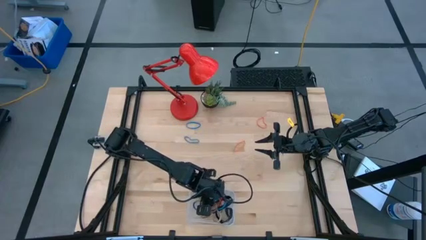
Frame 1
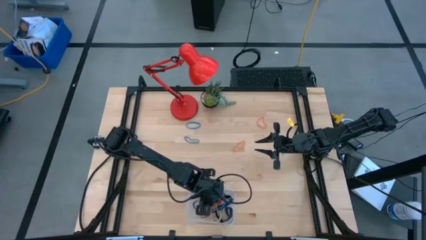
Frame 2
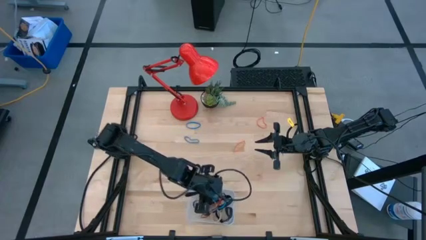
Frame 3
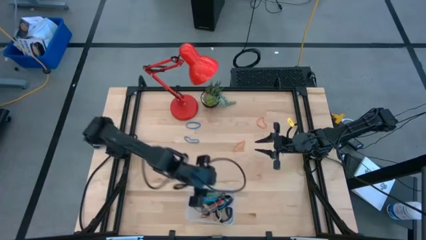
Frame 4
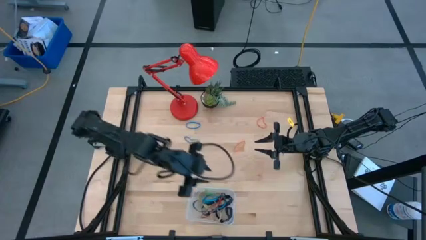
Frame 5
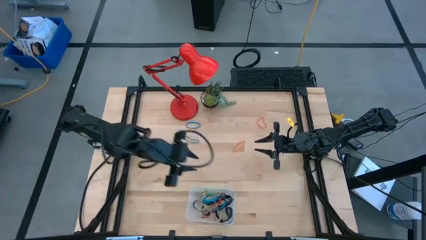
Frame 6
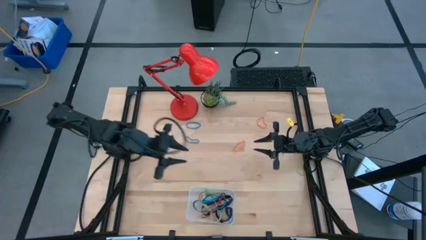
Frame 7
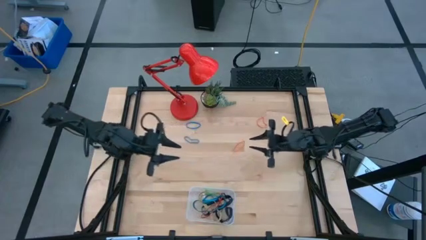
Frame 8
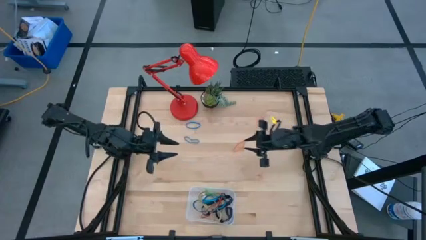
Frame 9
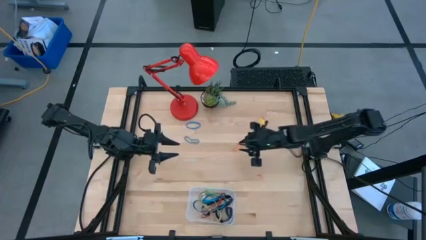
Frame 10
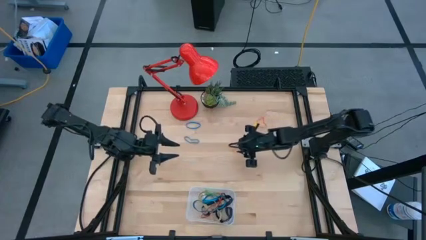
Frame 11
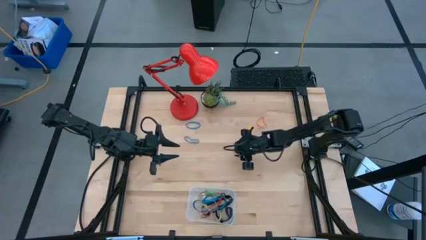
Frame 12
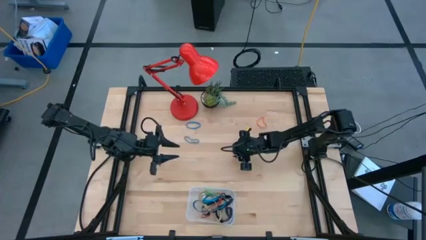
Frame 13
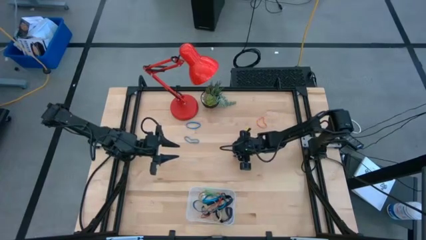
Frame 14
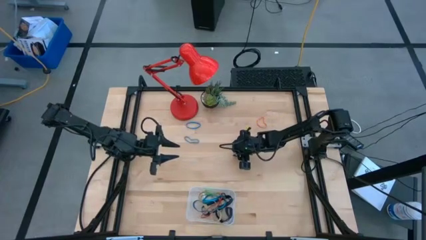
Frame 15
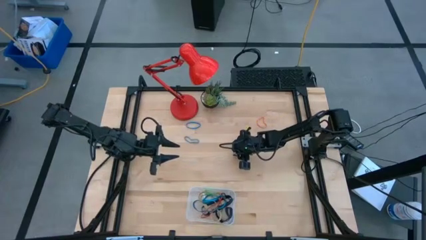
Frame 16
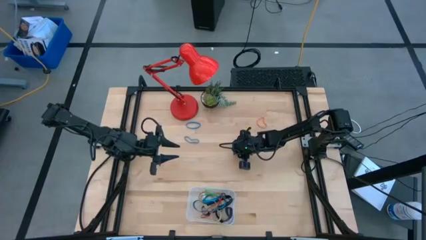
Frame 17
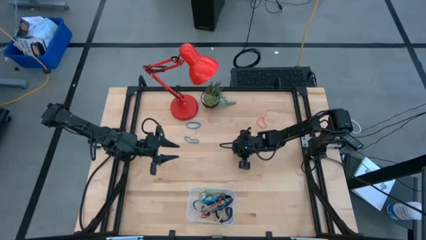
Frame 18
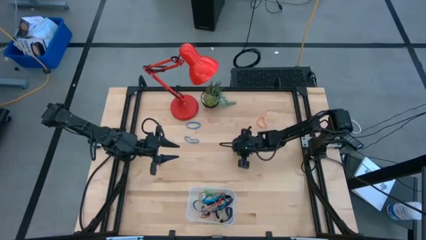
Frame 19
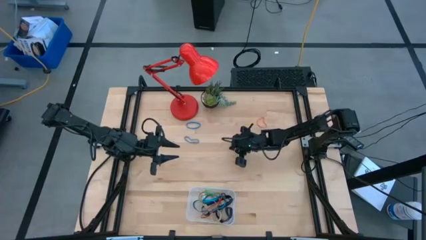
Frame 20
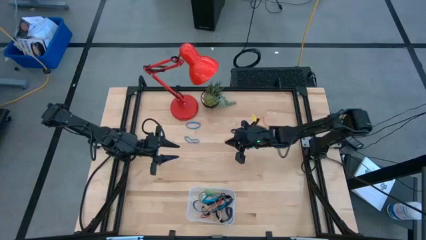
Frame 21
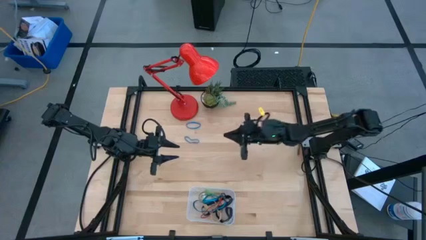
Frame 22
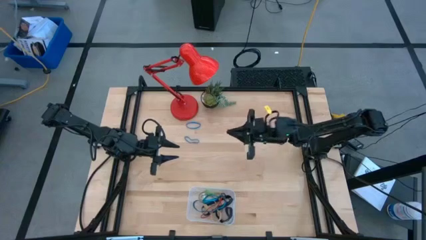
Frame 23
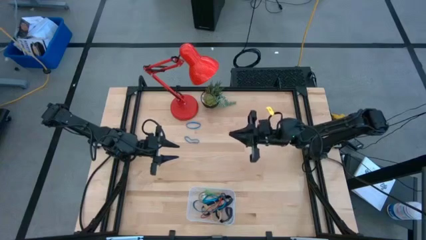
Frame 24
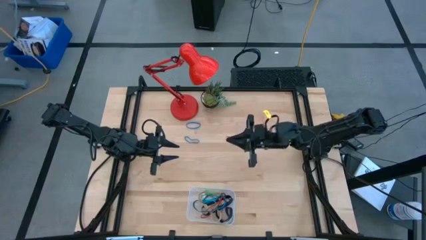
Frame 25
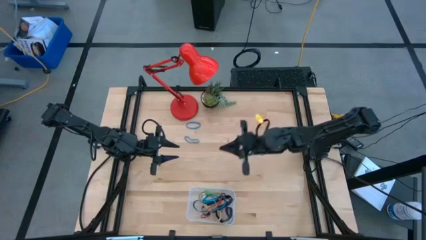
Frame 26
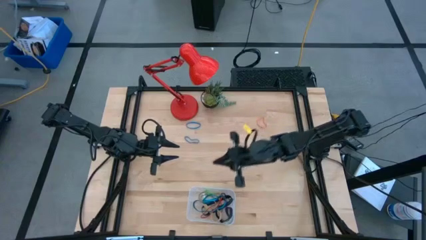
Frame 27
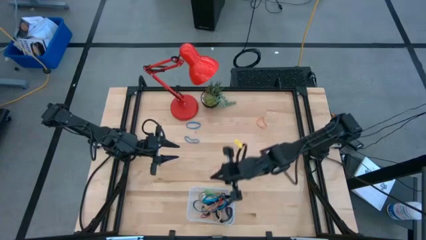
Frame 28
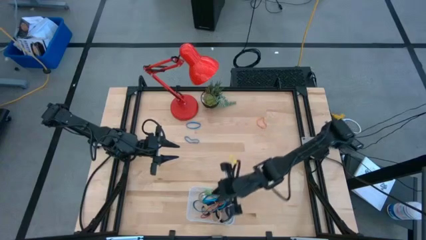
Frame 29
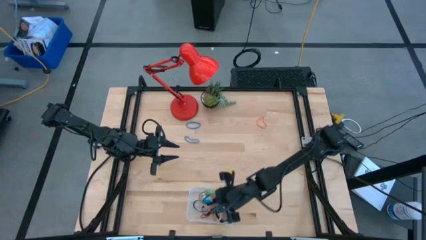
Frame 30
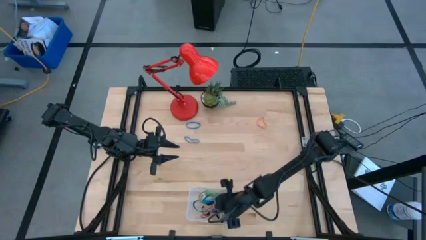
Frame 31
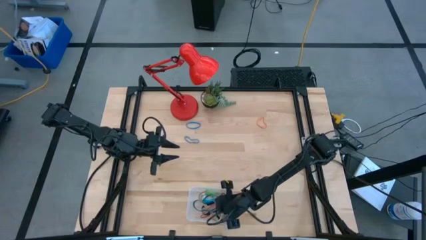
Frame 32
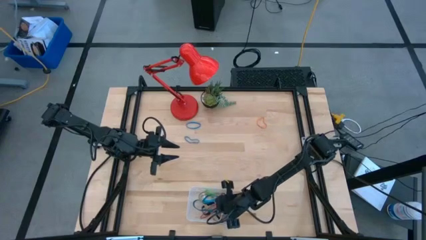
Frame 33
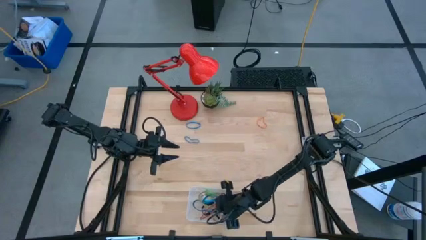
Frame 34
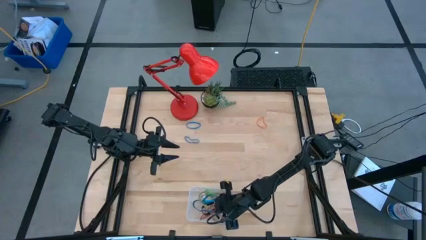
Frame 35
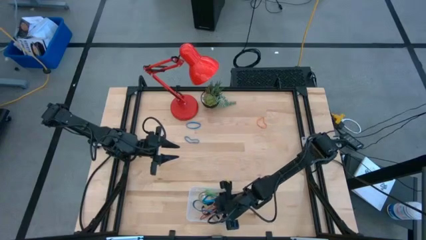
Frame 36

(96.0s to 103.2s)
Task: Pick and place rubber bands into bin
Put the orange rubber band into the transparent bin

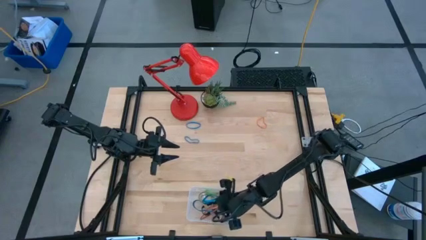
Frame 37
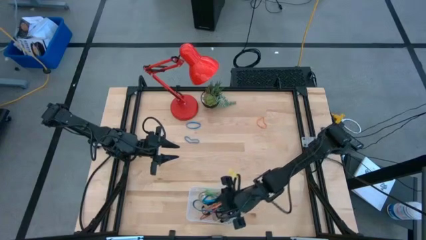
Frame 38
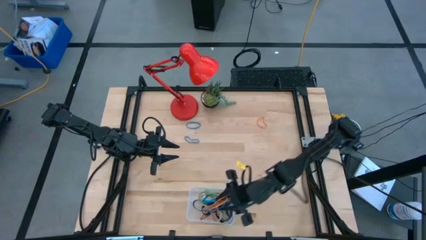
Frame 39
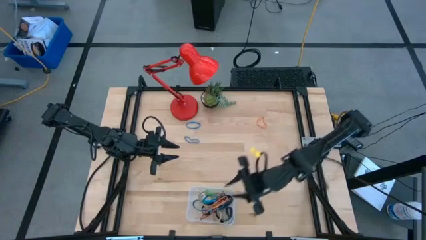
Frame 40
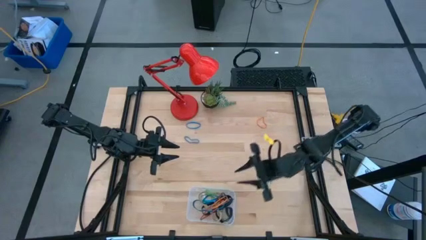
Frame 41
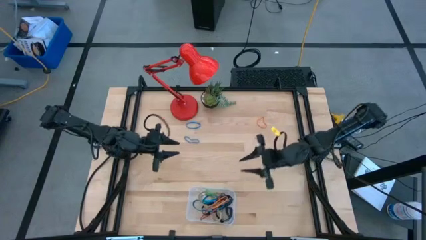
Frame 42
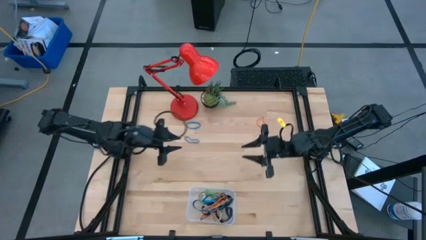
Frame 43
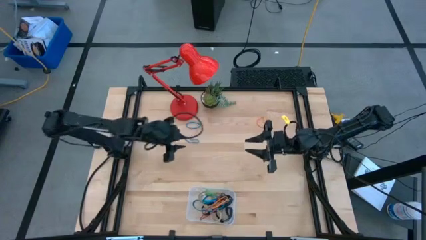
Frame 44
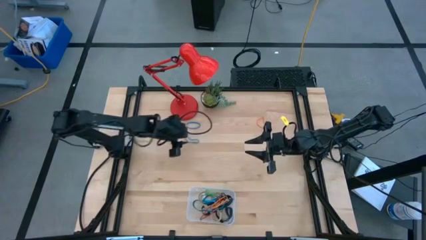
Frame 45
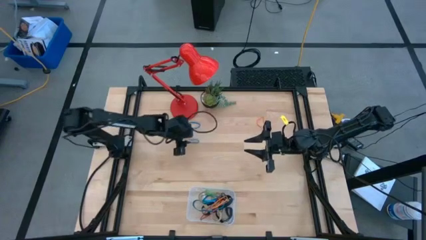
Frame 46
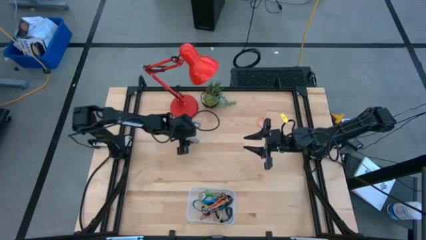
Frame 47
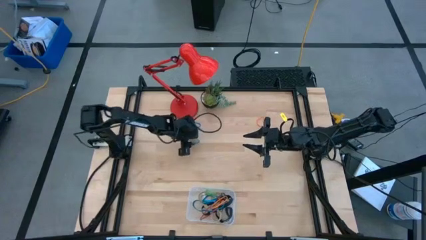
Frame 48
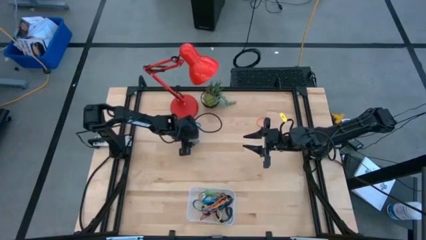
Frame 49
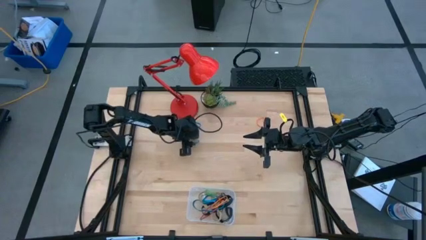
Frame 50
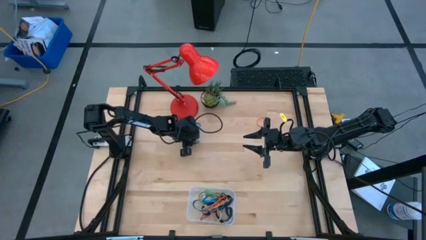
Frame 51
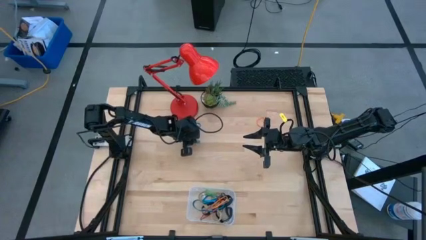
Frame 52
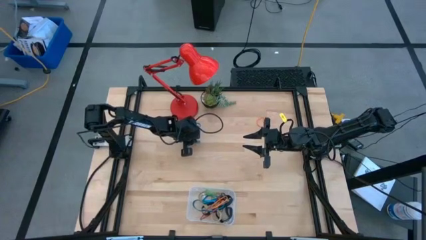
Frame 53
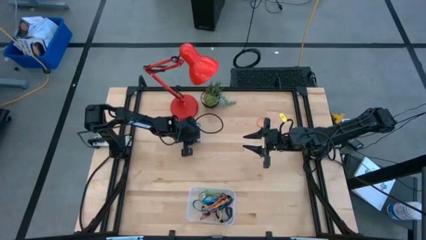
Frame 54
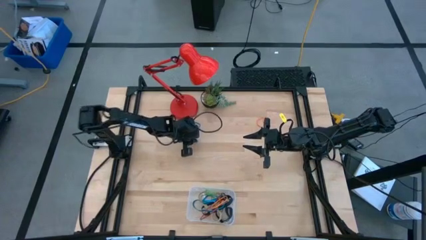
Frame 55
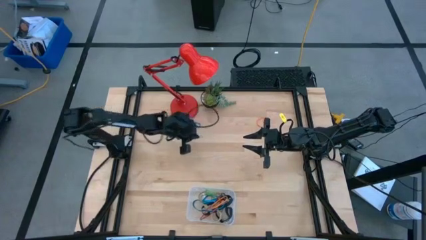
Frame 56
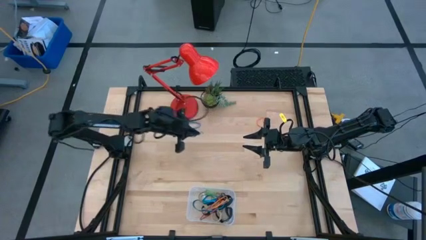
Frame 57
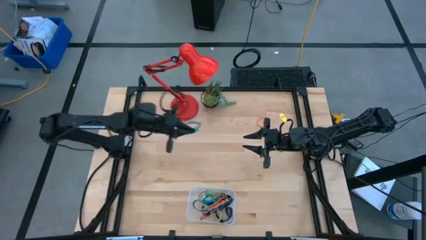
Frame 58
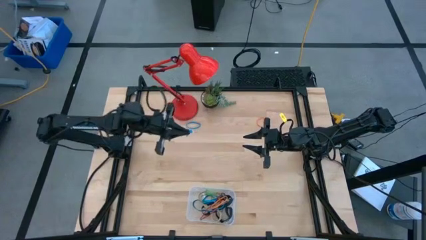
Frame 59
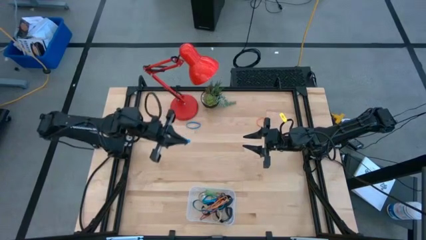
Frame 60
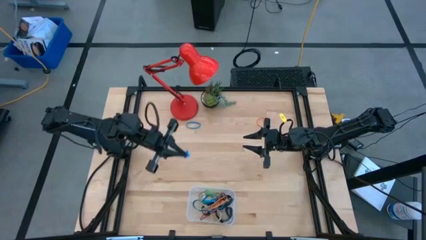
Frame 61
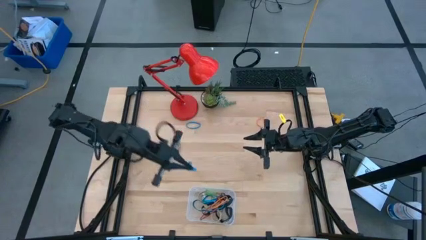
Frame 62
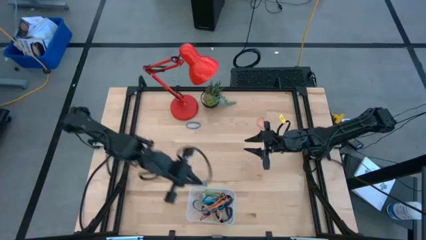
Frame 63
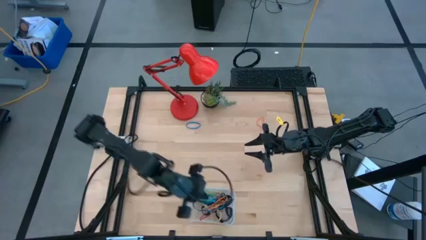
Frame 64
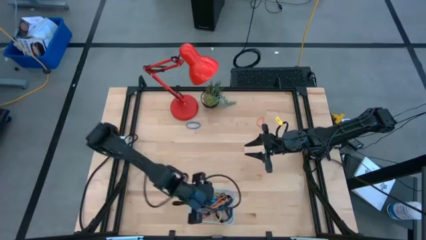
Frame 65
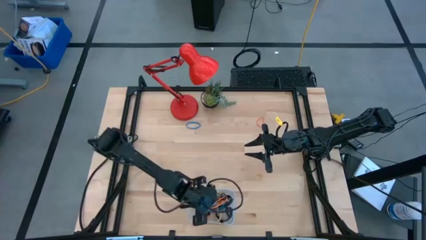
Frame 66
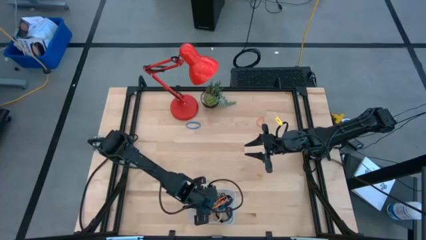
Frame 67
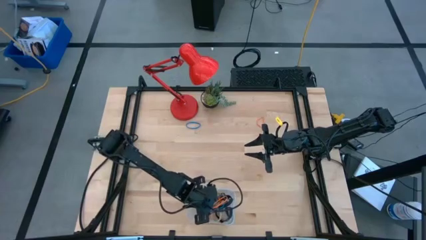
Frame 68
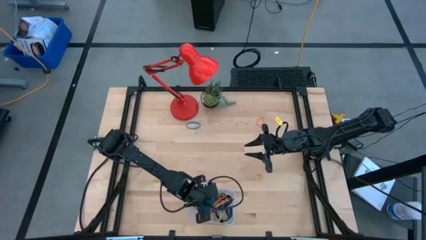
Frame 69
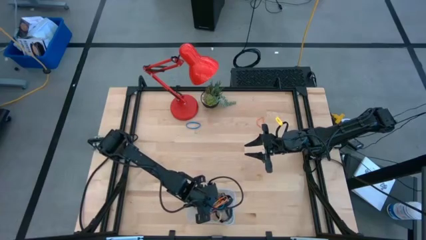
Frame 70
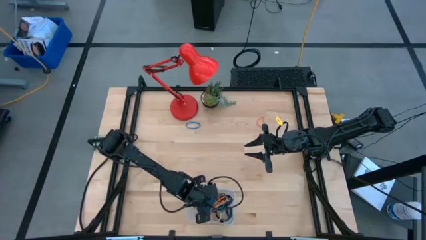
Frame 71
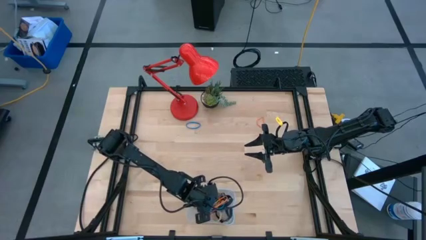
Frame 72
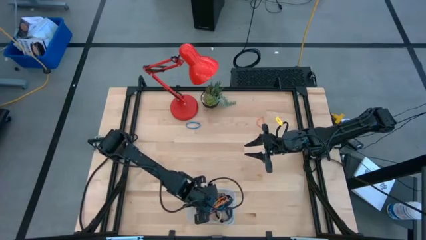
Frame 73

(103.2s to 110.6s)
Put the blue rubber band into the transparent bin

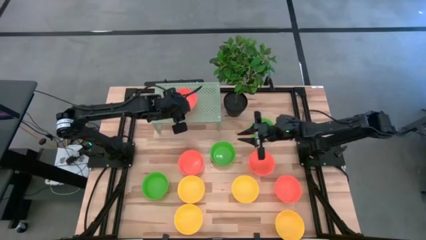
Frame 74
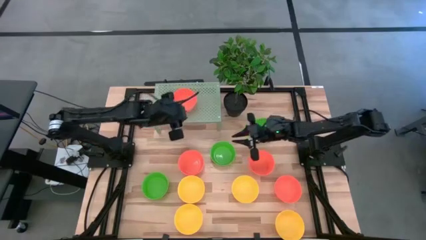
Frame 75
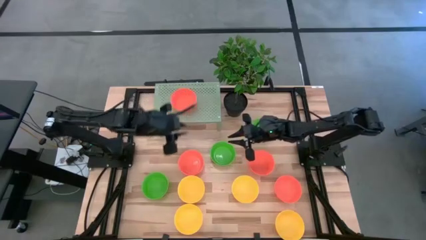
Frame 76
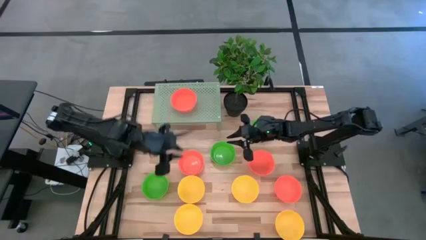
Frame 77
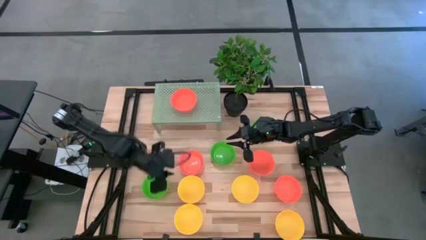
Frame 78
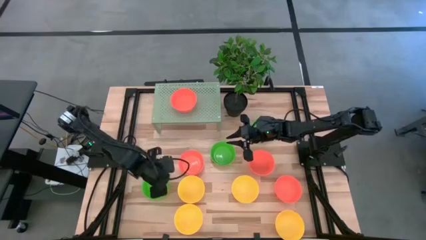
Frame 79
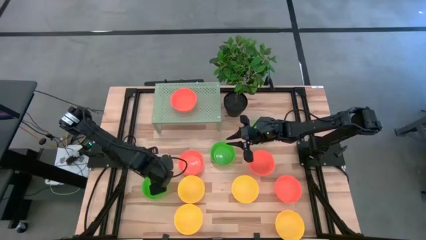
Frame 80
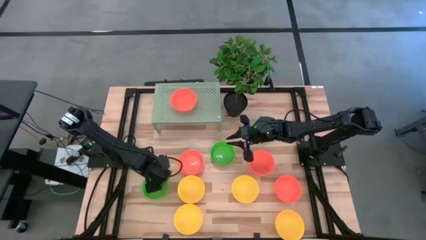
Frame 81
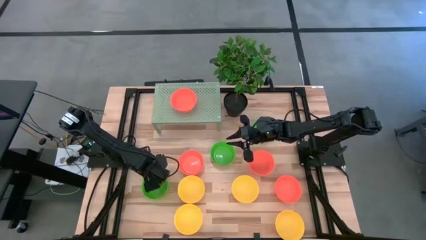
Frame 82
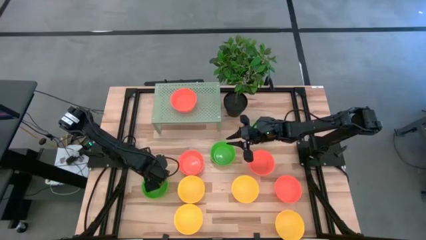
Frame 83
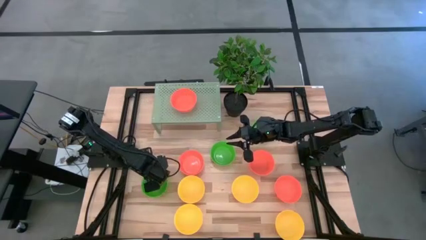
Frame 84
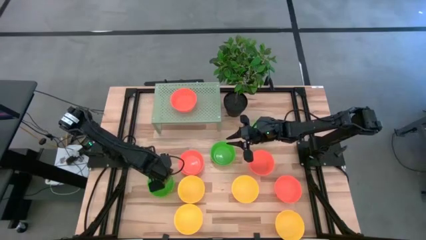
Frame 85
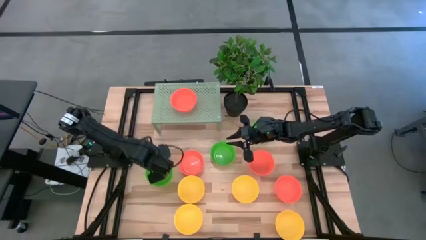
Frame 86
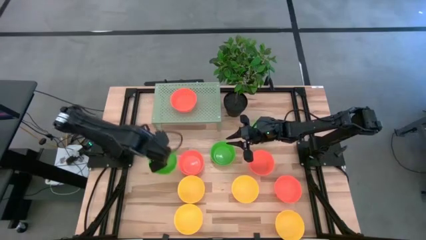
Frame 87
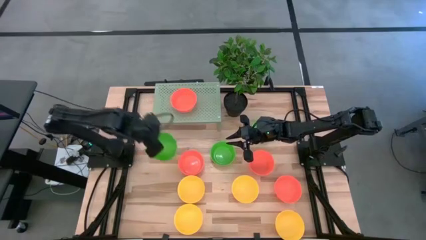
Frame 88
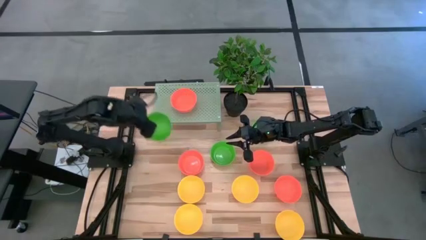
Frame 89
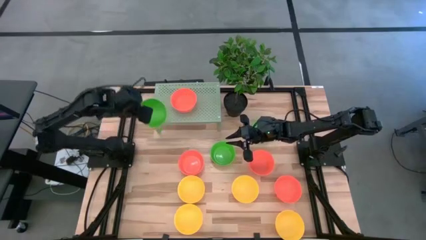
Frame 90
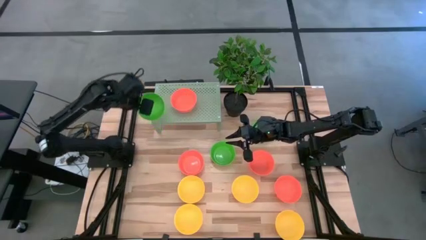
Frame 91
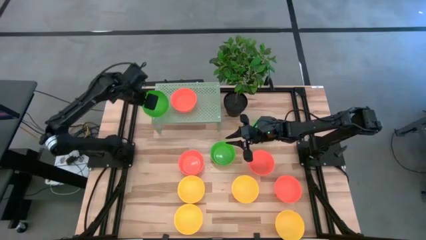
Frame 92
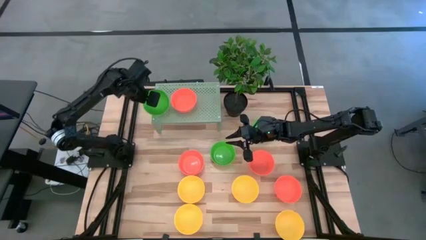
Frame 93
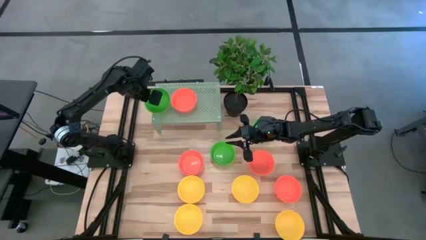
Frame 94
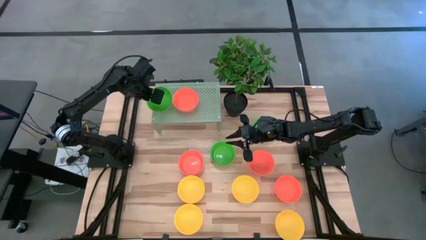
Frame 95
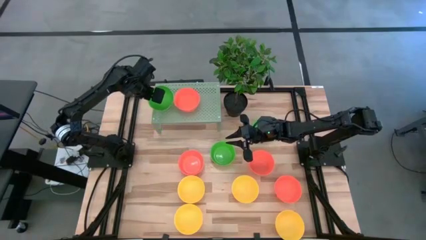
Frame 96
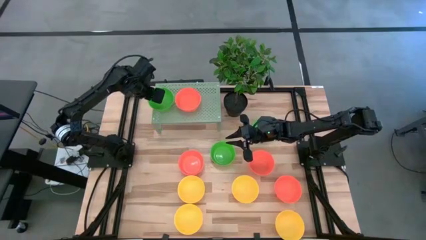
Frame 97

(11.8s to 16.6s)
Task: Pick & Place Mini bowls
Put the green bowl on the shelf
